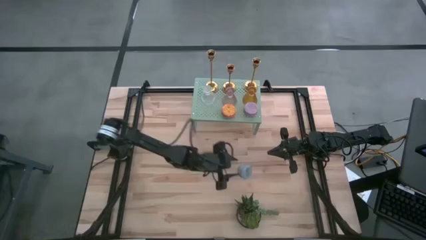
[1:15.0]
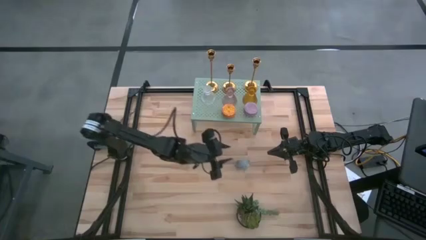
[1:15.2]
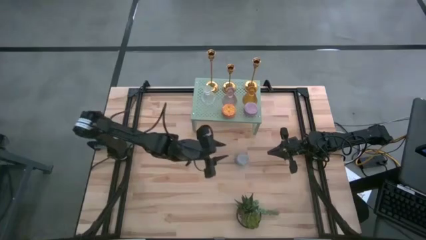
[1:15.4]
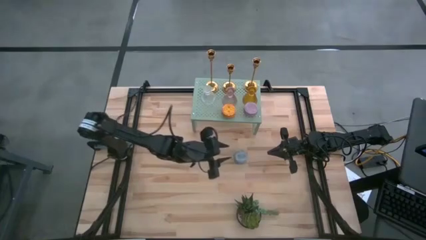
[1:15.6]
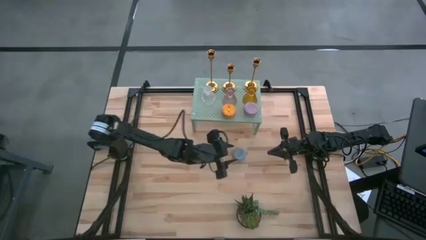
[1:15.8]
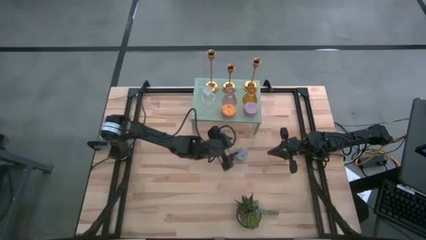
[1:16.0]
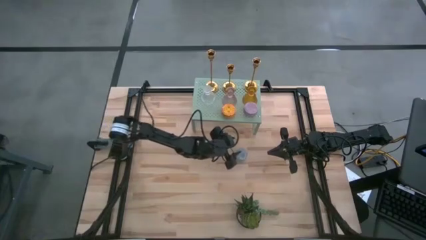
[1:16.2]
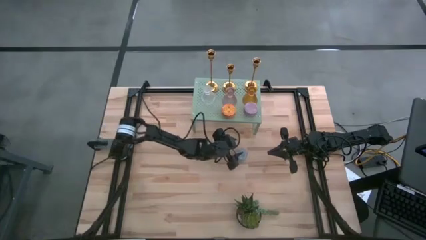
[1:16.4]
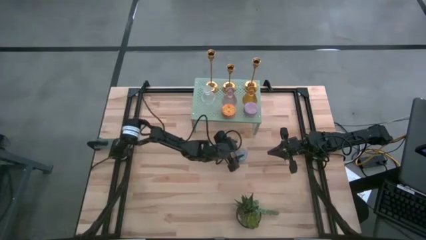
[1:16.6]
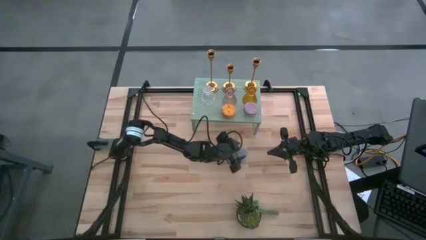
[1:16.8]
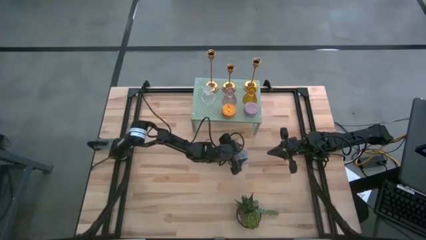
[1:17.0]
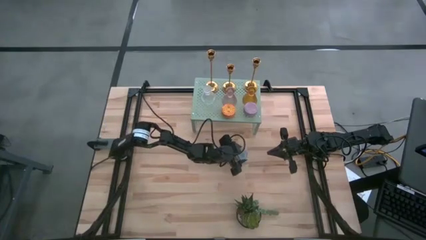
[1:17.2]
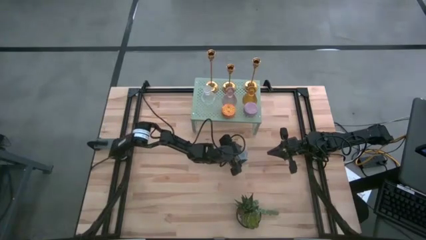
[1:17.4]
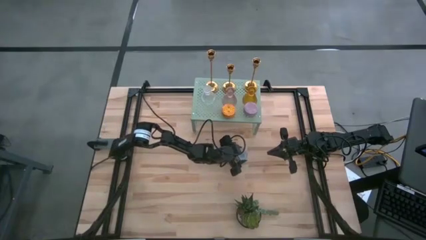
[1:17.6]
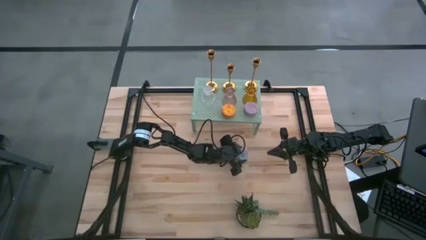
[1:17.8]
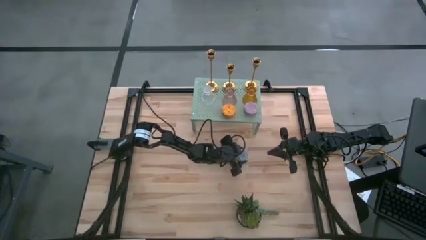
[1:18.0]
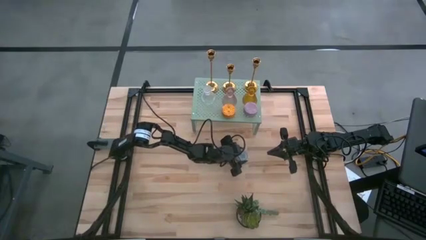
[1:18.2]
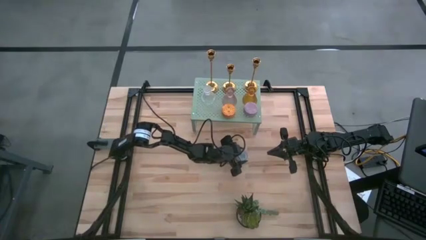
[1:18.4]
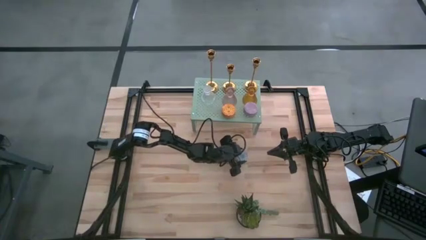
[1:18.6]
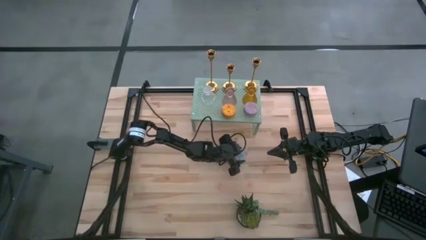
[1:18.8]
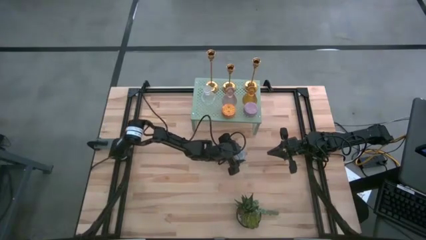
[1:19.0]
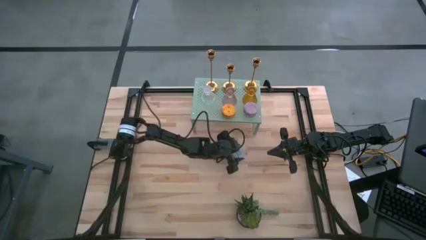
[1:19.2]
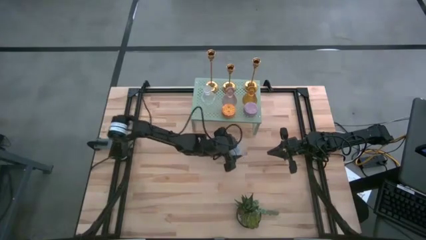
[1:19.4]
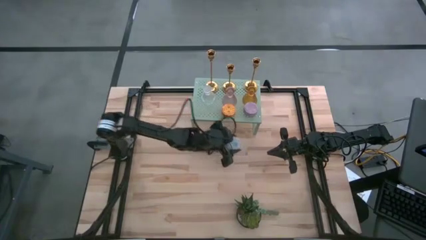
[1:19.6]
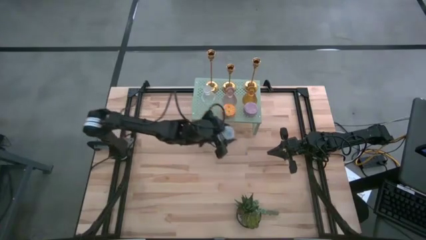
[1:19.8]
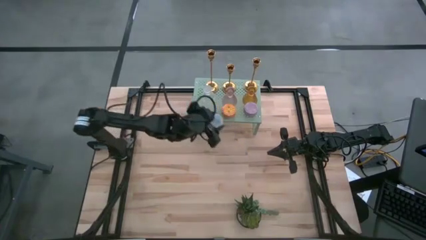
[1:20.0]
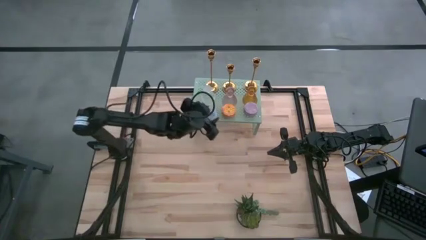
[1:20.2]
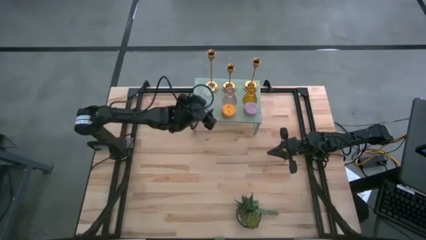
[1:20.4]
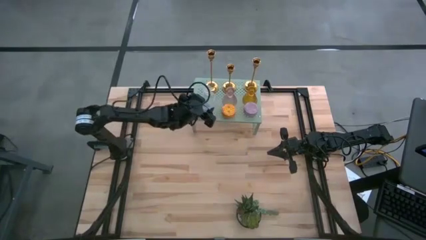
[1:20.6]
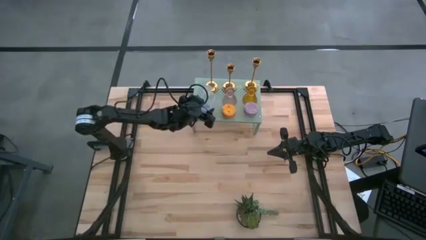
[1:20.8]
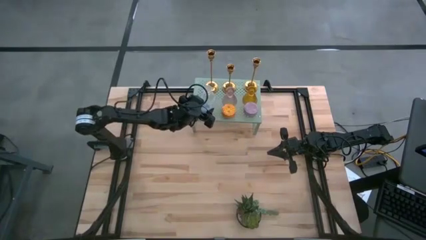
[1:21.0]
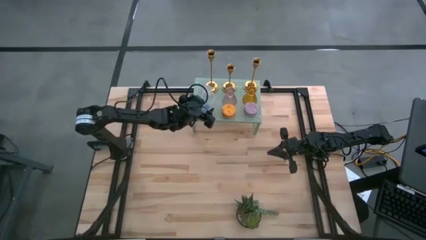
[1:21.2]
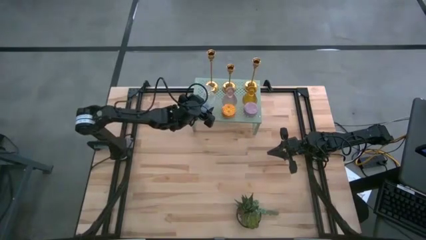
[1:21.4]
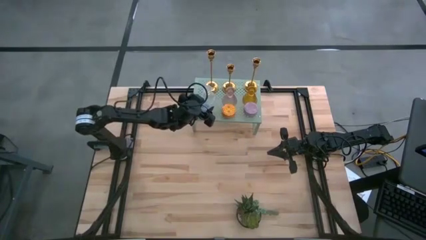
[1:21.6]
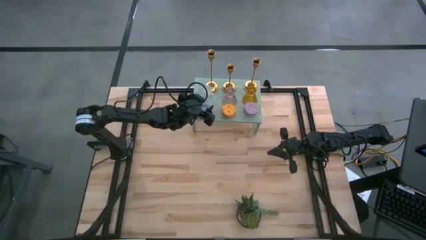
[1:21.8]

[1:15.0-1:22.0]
Task: Pick & Place candle stick holders
Put the blue scented candle on the shelf

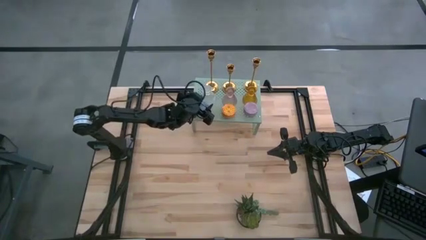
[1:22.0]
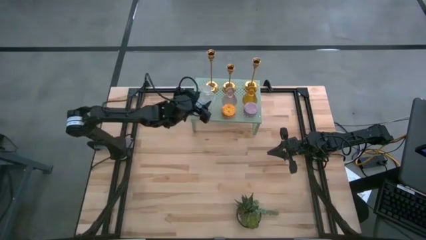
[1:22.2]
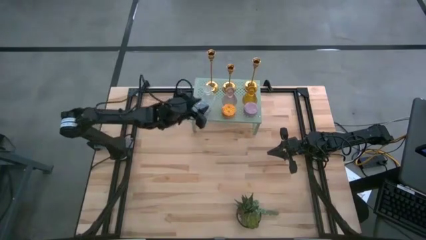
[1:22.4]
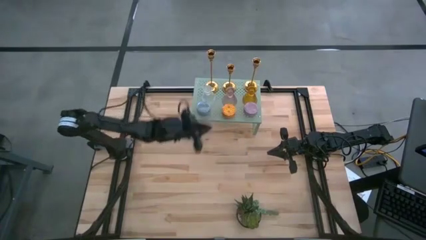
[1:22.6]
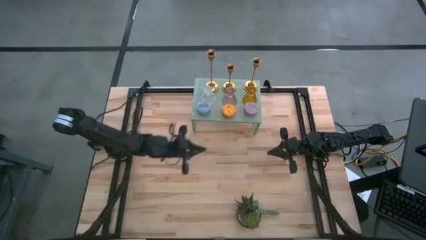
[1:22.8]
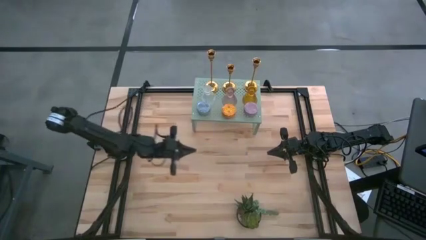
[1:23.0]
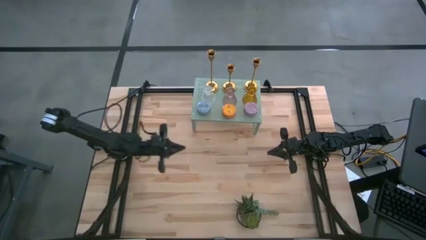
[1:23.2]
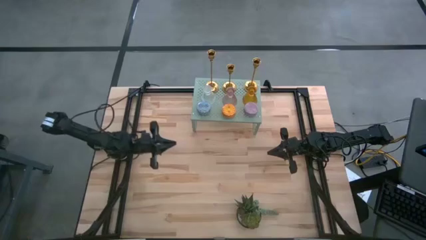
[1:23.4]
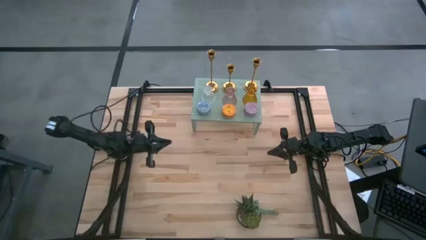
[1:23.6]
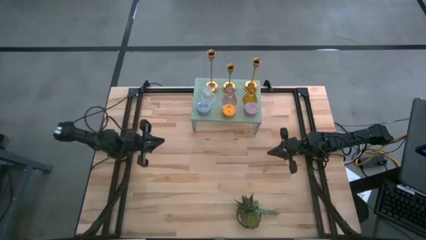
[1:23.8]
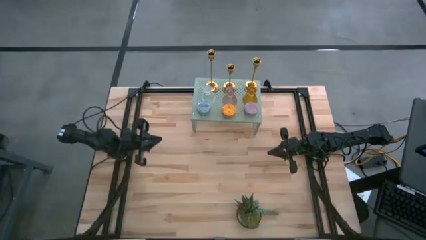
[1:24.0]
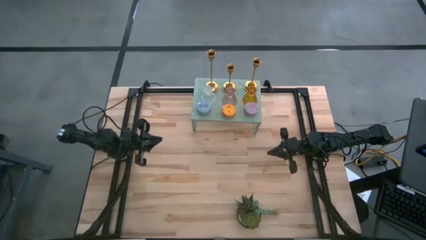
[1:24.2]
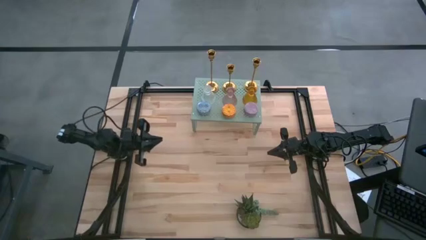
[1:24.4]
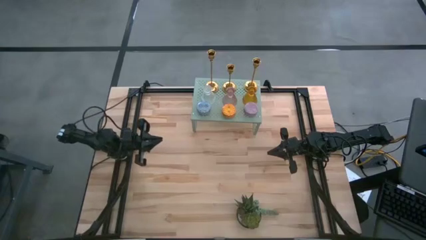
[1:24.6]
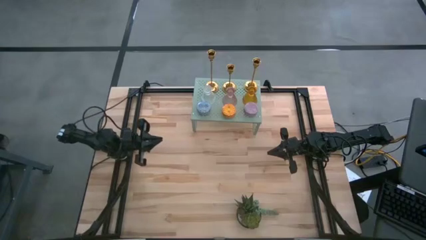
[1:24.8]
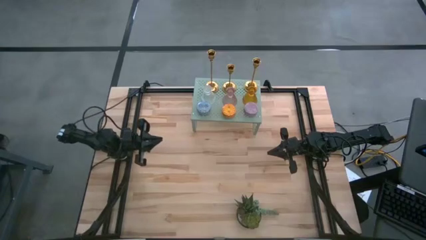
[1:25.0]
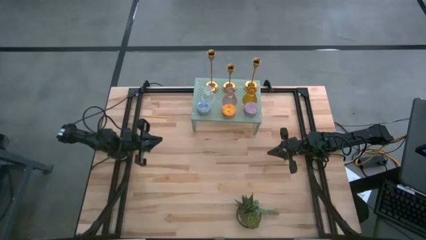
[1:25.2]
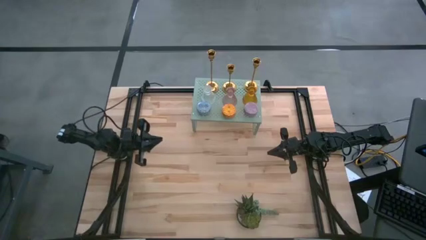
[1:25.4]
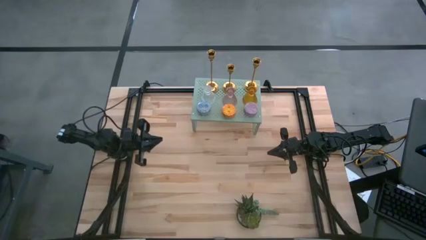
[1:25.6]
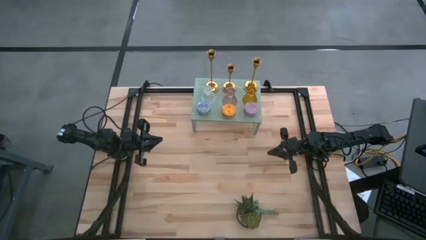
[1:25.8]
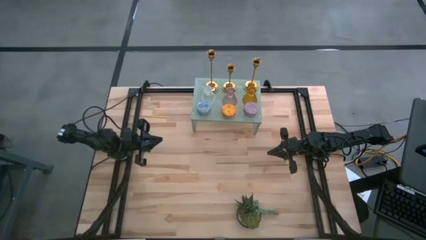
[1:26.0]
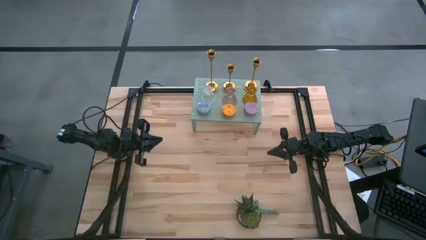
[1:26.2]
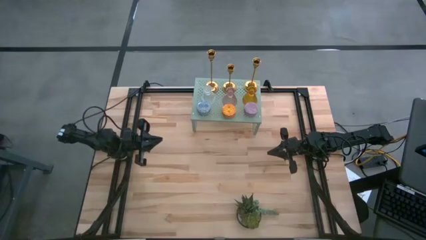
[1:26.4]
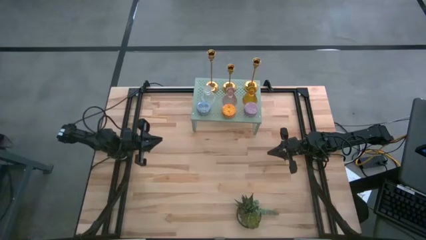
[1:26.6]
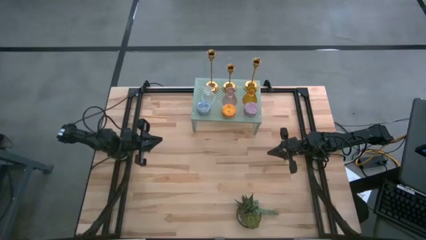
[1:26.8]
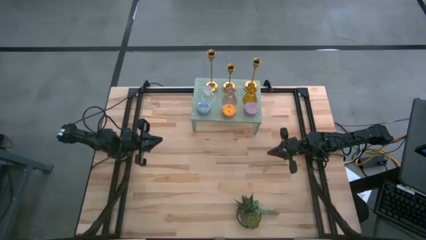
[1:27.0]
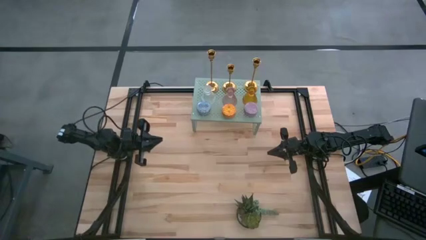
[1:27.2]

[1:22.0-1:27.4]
Return to Home Position
